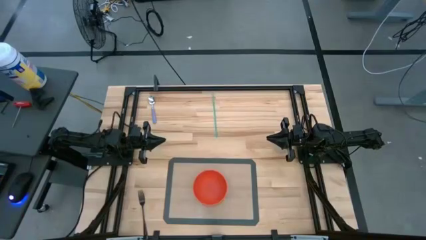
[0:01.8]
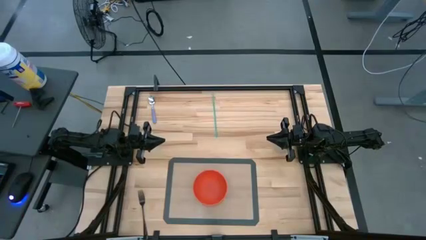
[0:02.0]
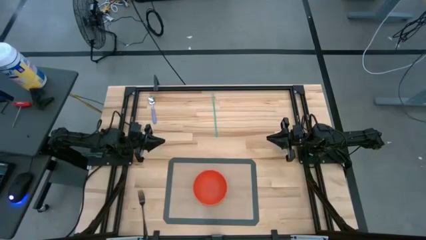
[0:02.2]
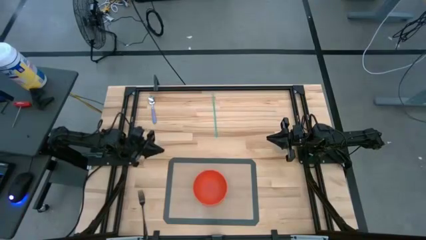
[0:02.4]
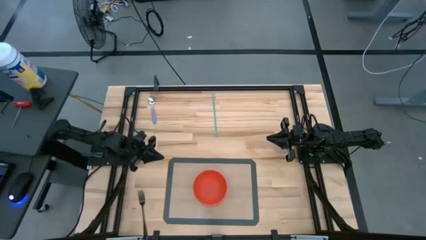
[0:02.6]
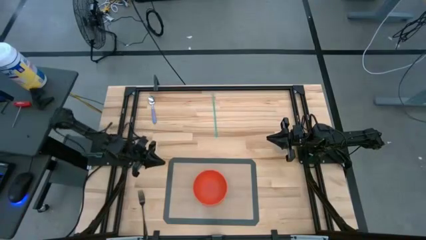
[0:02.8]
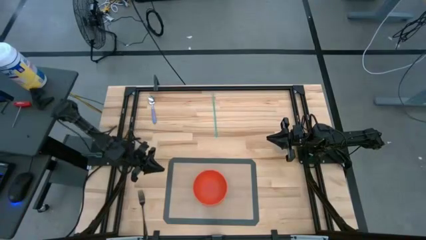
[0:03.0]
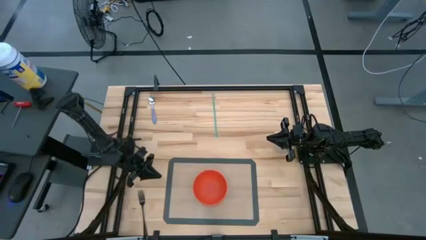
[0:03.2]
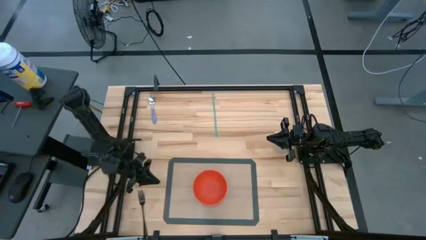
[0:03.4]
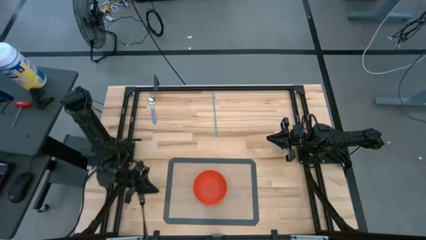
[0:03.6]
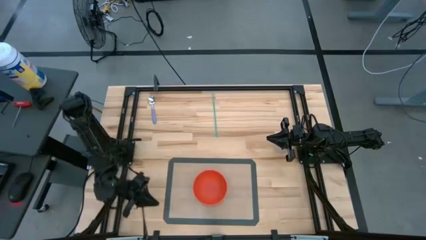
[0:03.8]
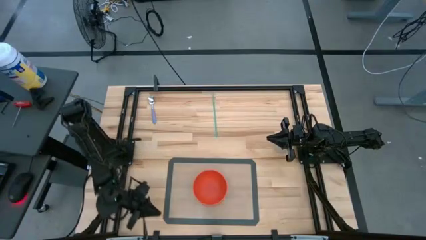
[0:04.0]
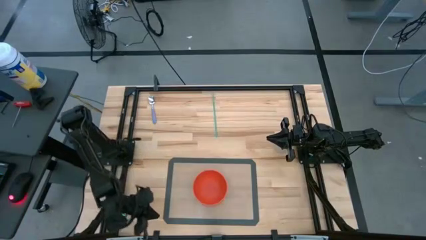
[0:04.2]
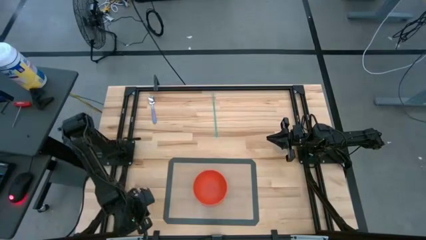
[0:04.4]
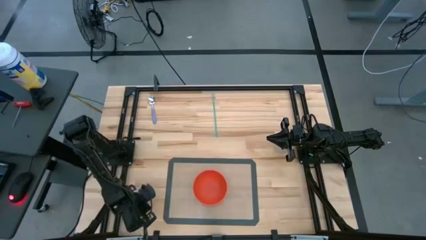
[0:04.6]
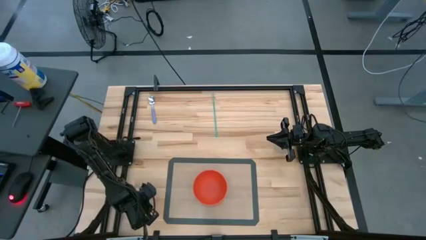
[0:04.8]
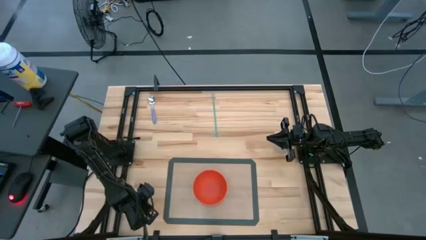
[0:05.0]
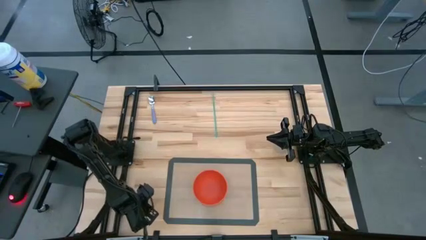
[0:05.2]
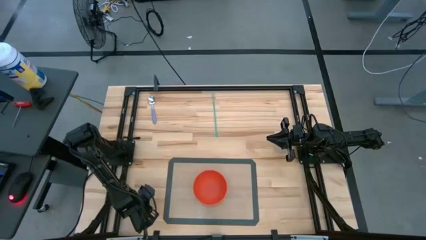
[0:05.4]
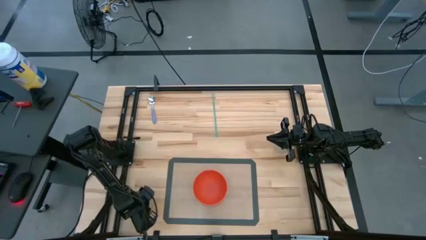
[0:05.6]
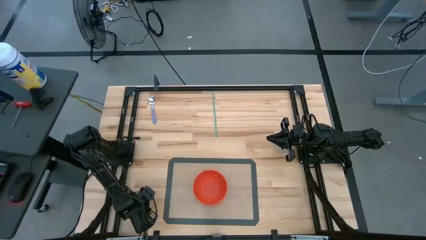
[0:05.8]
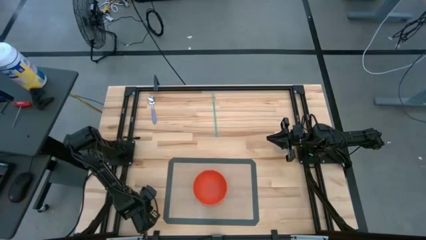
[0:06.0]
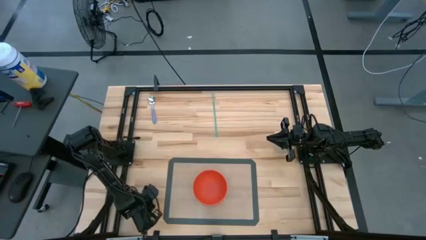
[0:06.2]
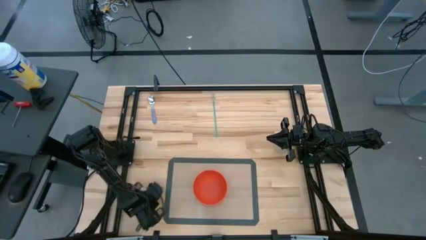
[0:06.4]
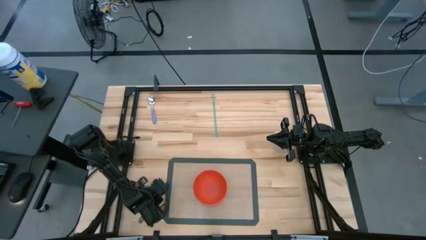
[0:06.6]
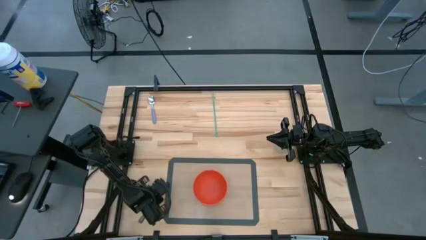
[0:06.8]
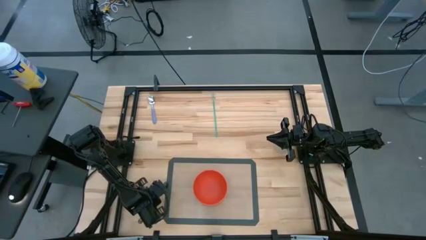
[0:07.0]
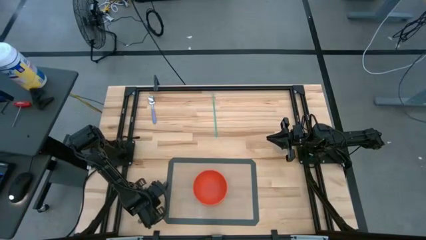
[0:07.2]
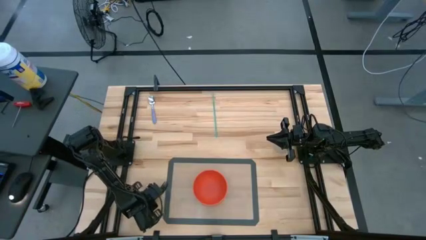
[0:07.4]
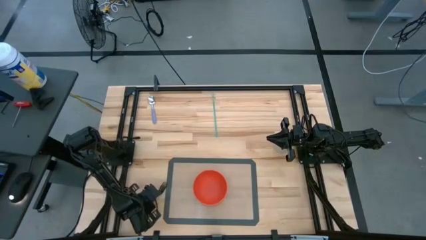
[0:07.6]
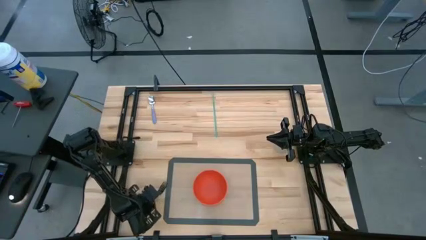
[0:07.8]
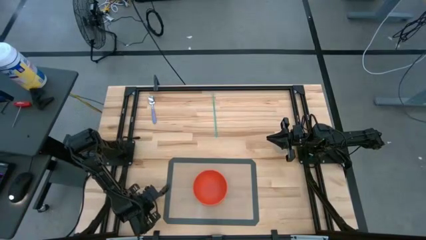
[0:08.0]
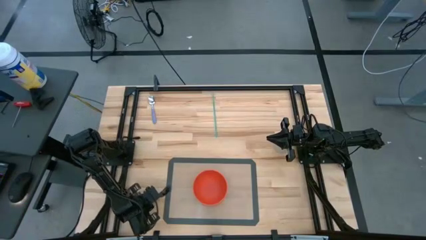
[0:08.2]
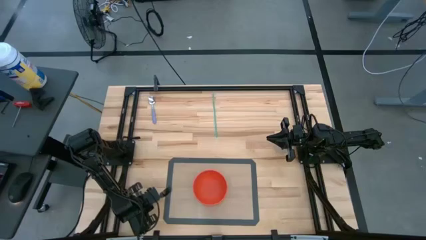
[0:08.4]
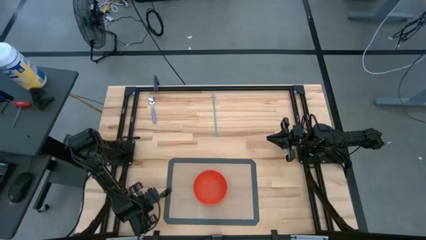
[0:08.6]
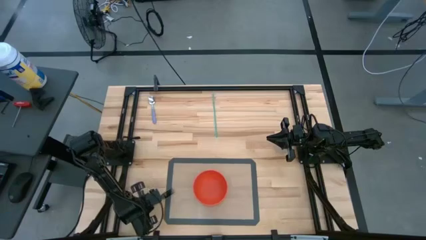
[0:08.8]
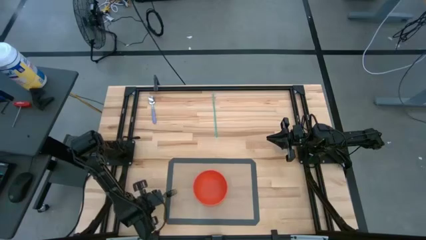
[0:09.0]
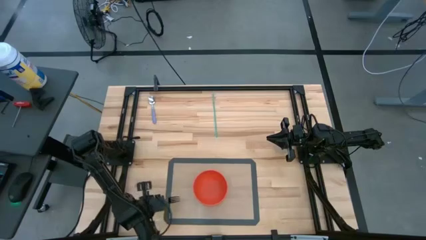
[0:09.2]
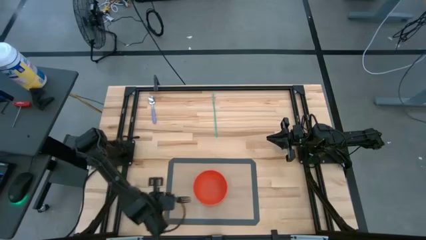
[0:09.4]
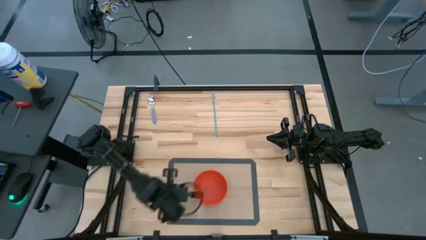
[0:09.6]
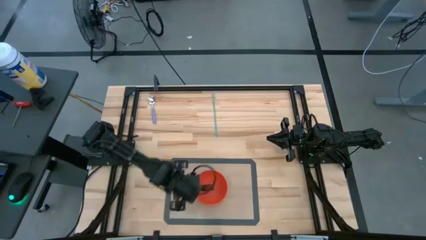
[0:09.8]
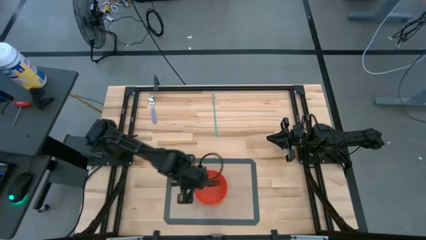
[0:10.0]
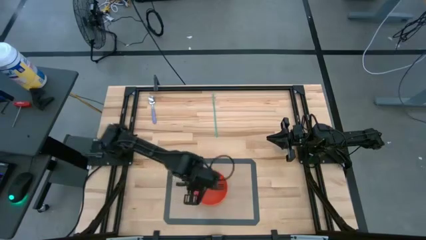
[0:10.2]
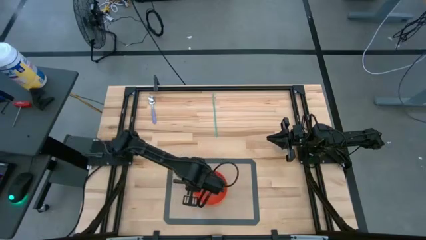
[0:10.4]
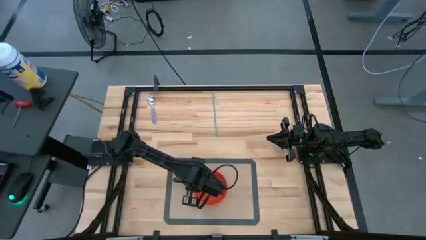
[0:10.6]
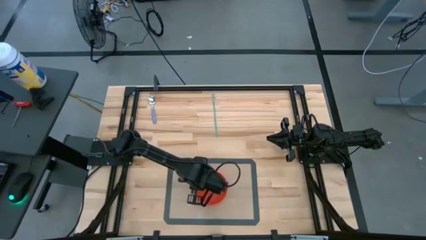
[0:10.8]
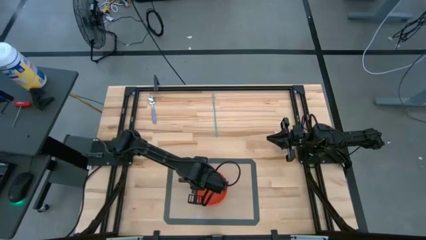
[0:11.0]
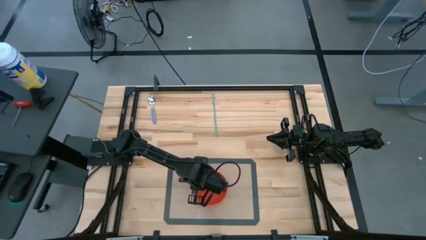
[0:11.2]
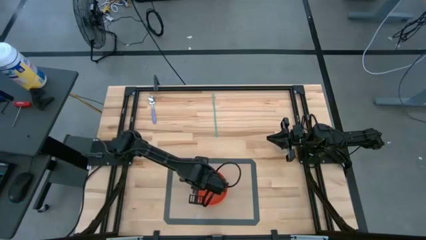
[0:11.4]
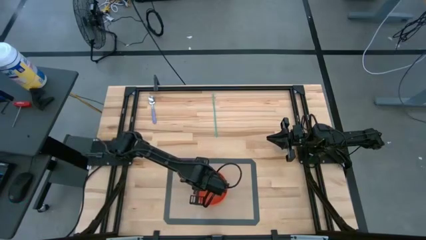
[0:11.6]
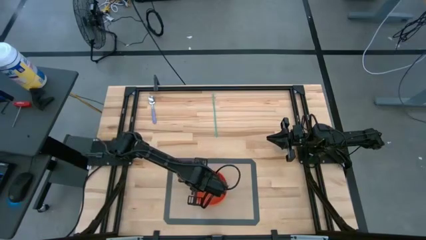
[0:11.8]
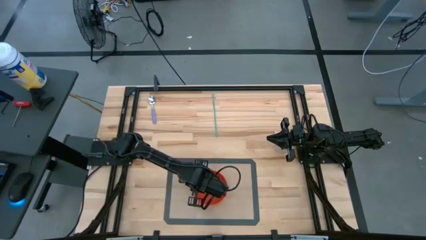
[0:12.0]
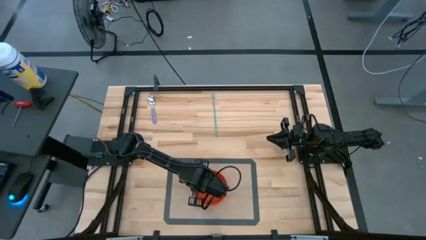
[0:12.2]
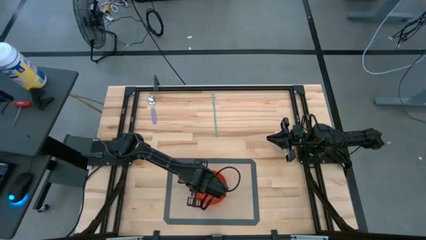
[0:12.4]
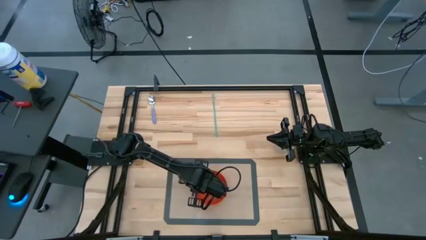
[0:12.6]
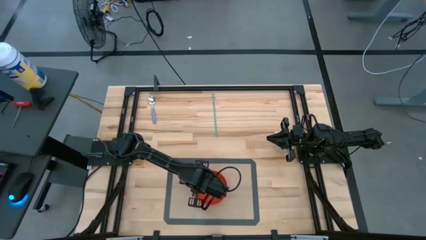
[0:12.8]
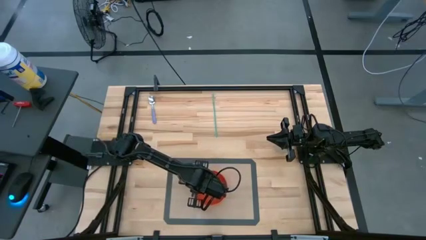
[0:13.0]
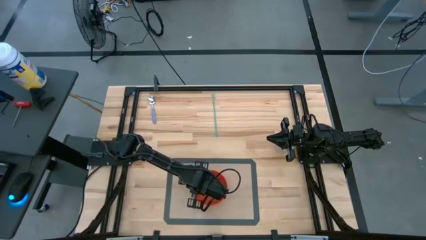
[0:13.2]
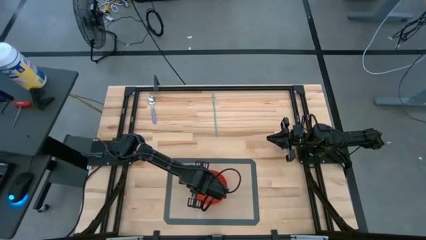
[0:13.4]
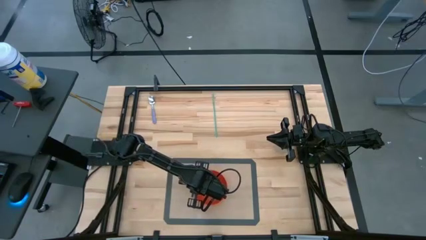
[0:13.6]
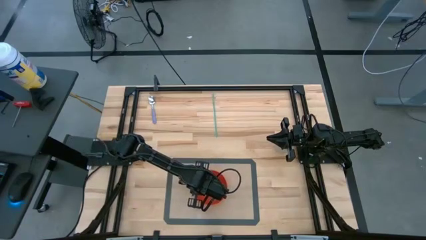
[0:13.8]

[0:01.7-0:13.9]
Task: Pick & Place Utensil
Put the fork on the bowl
